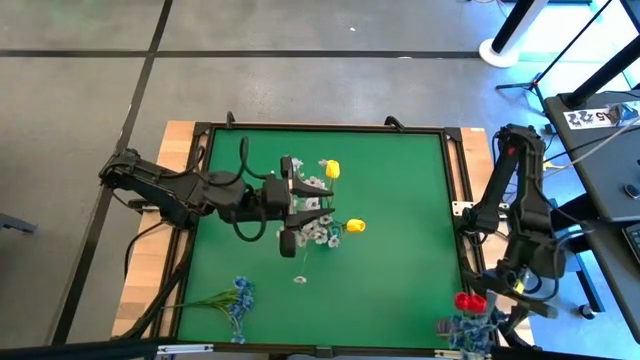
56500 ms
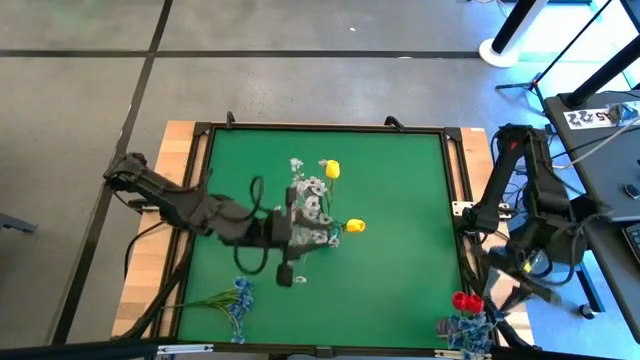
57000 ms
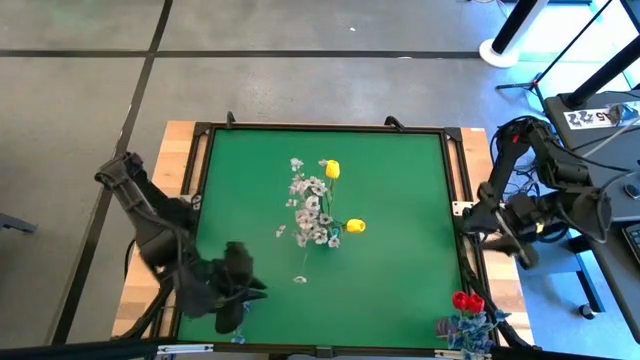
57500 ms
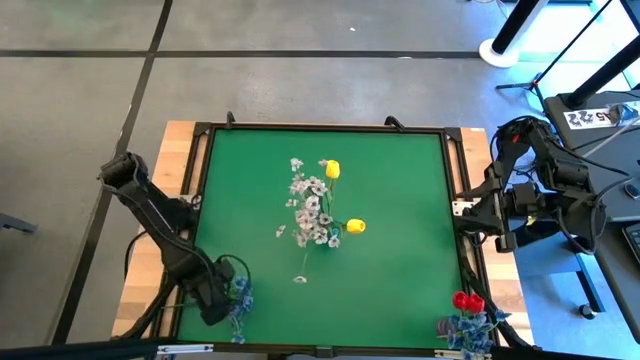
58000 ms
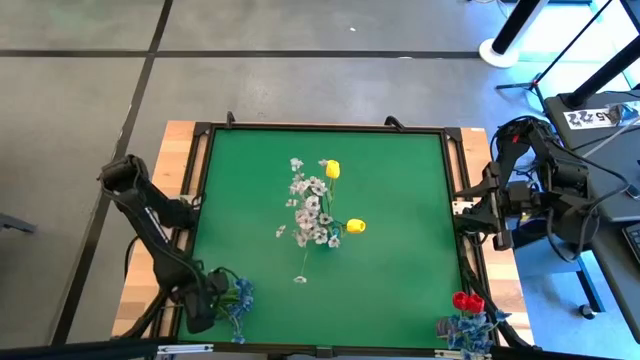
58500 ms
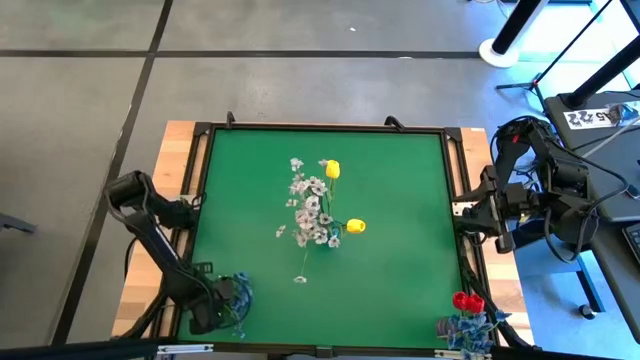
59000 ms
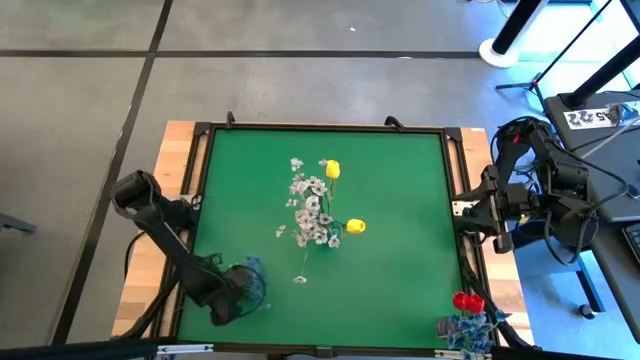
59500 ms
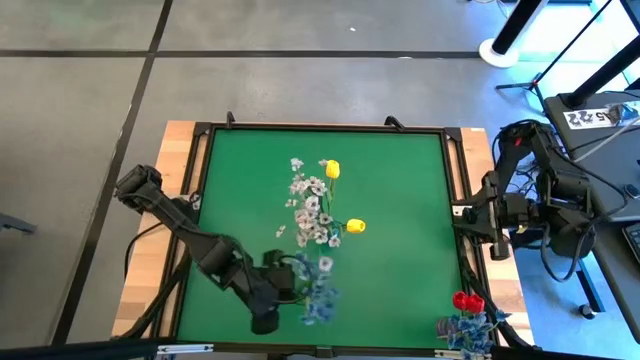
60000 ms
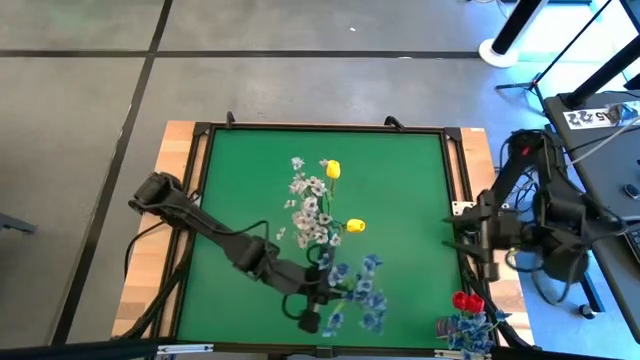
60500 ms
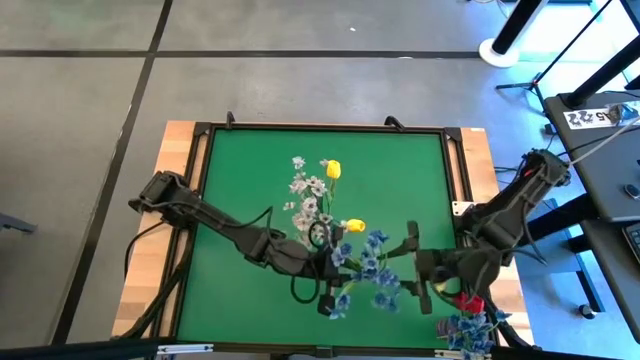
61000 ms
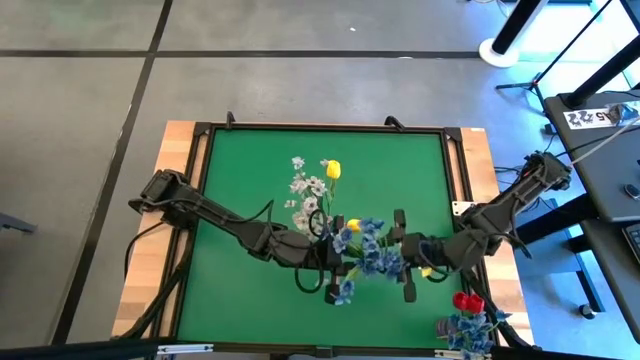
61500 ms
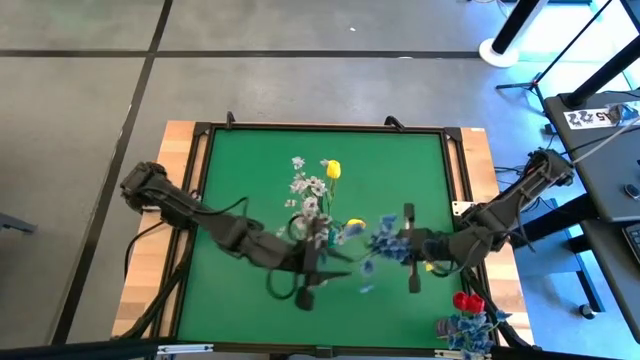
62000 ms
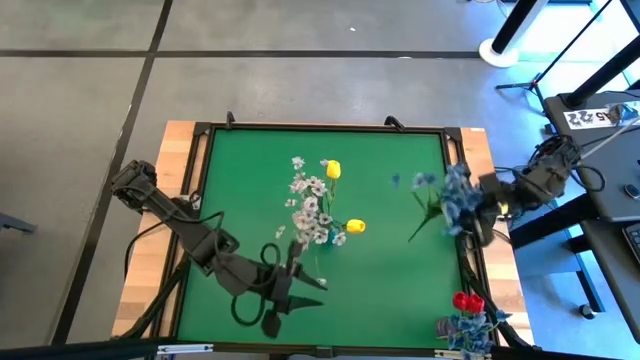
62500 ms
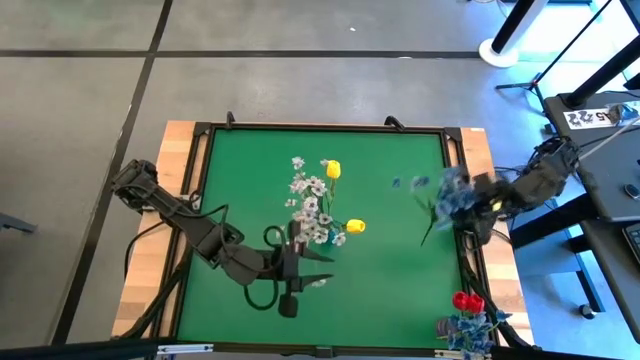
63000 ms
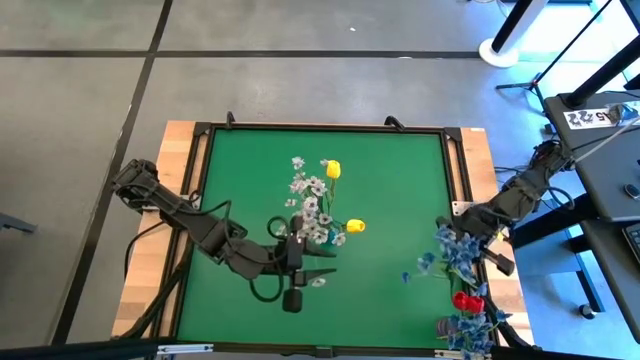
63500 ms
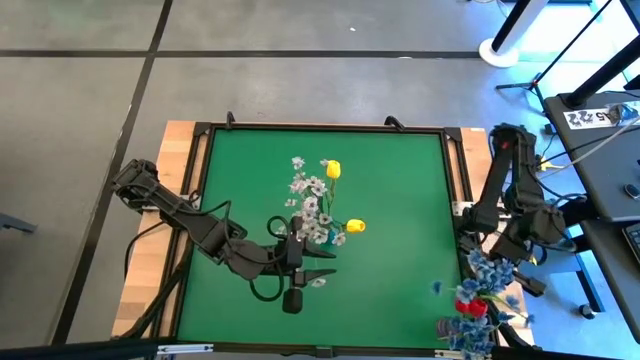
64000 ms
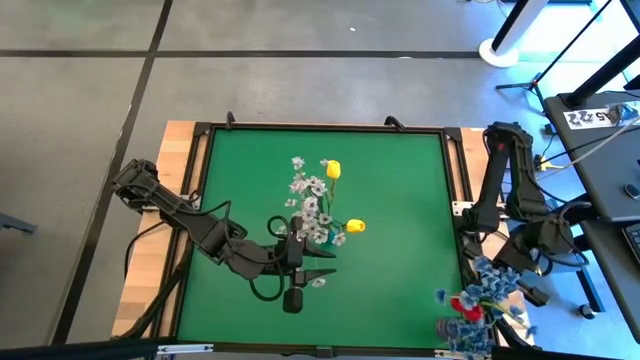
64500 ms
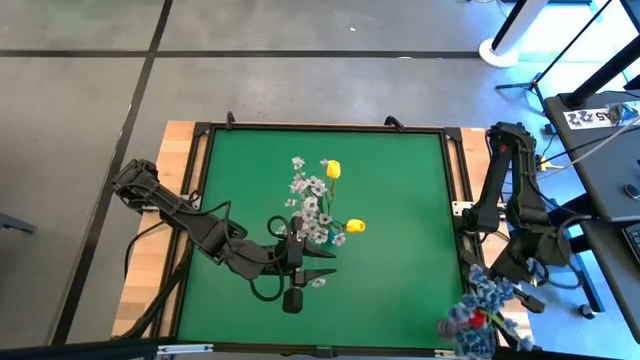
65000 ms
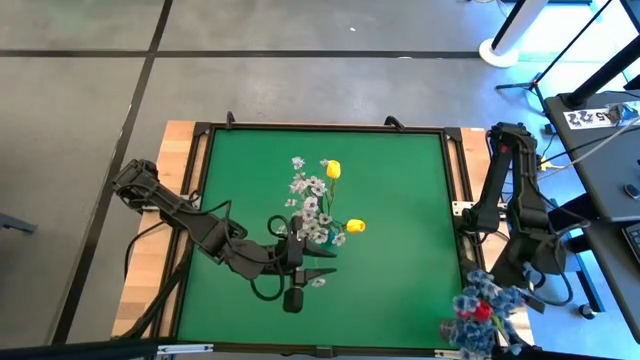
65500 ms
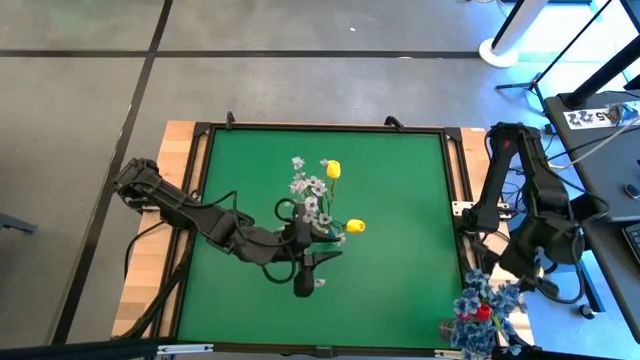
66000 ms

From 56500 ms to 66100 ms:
Task: Sort flowers into vase by color
Put the blue flowers into the purple vase

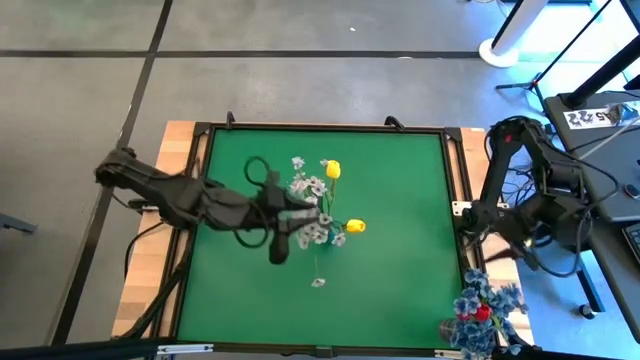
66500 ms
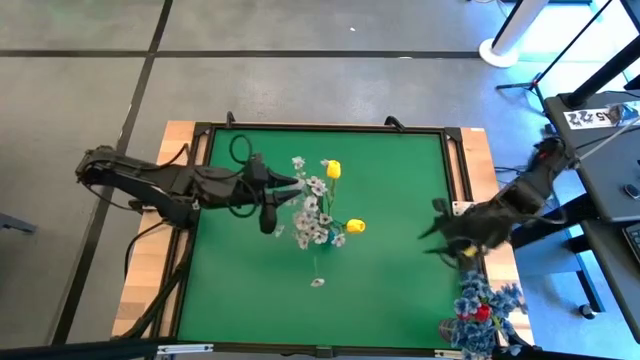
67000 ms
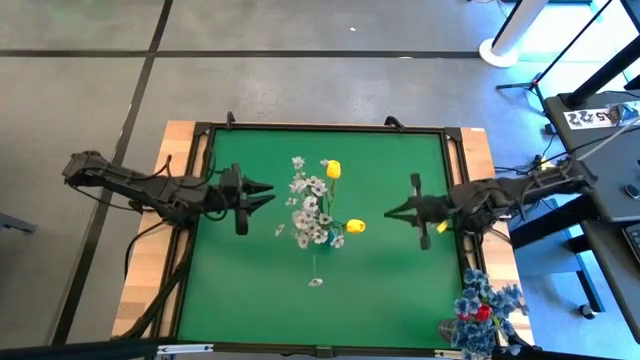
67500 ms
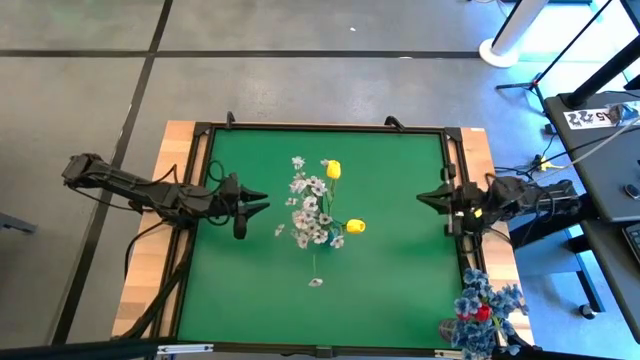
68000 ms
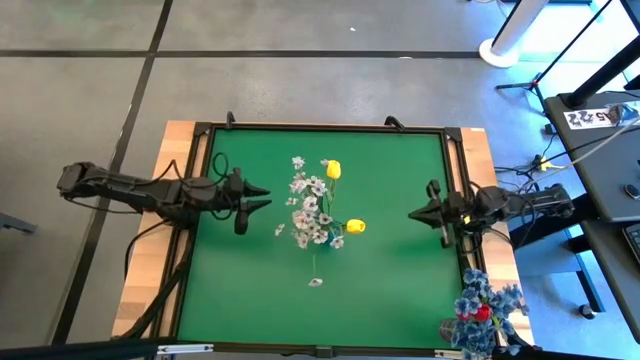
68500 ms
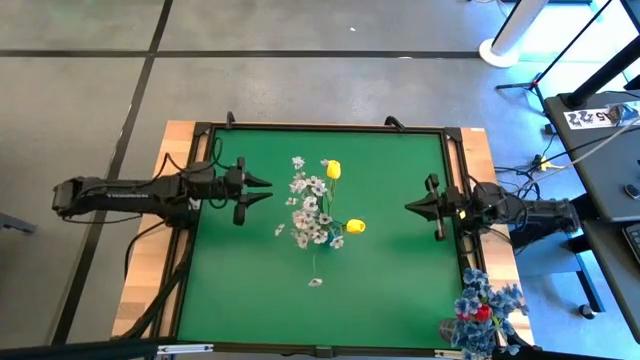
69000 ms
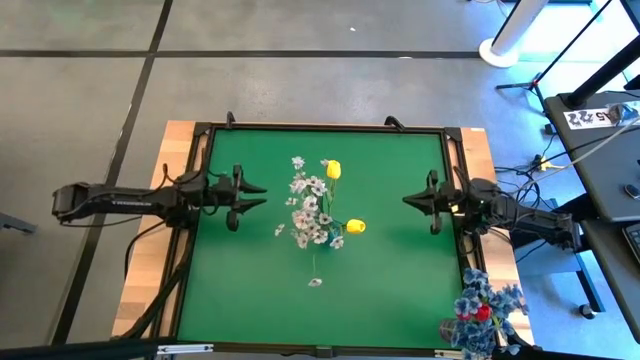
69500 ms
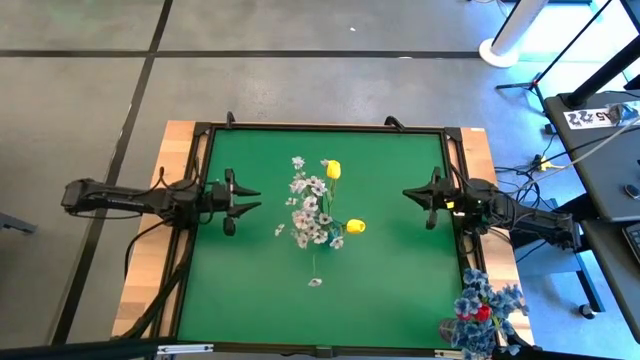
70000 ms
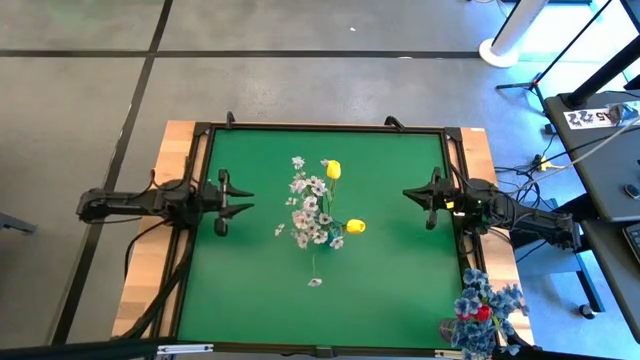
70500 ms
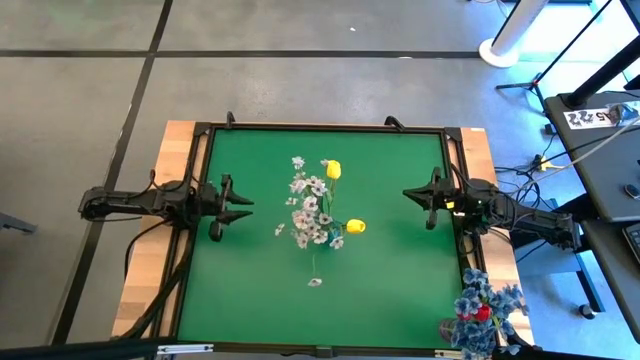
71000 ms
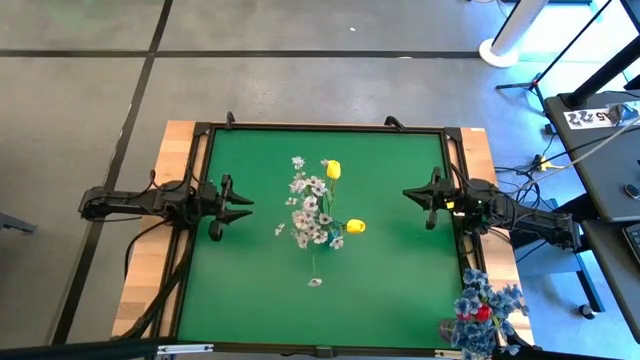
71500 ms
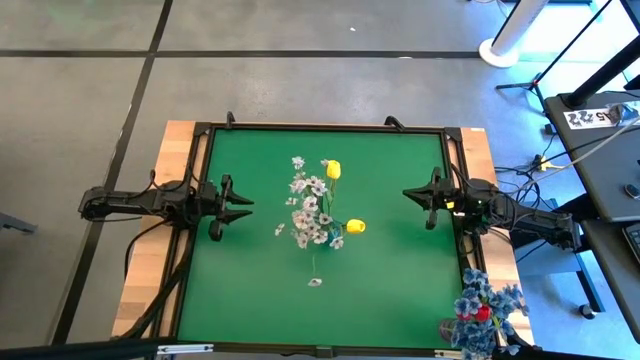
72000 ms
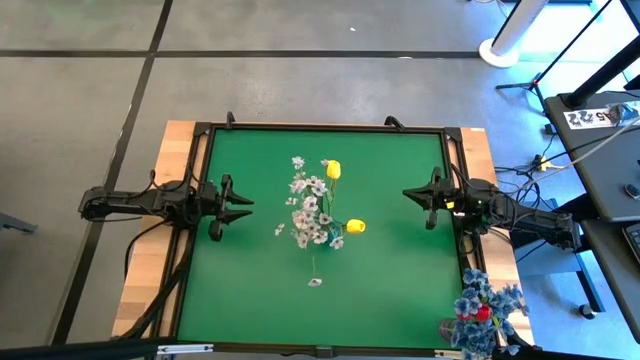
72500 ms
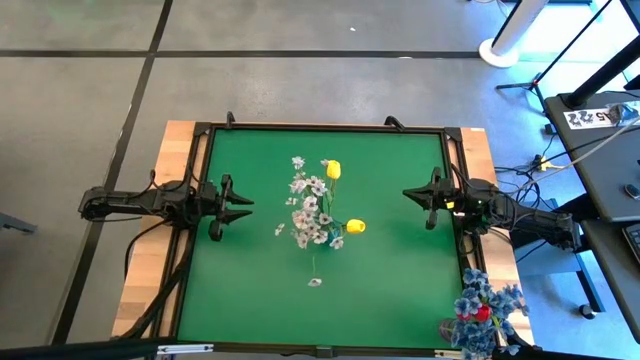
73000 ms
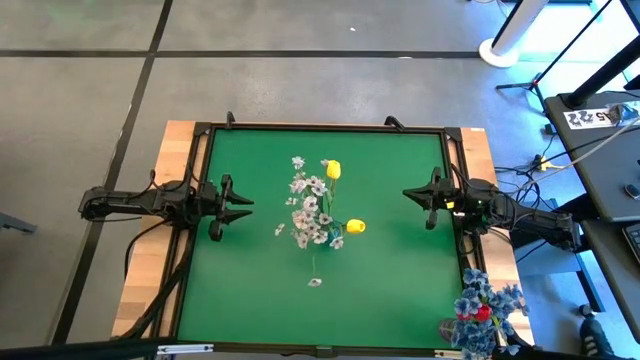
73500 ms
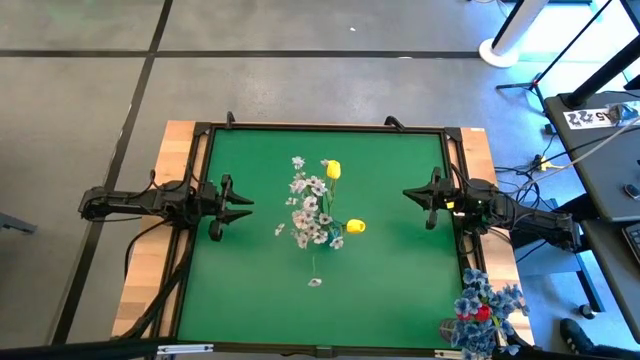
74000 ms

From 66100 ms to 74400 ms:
Return to Home Position

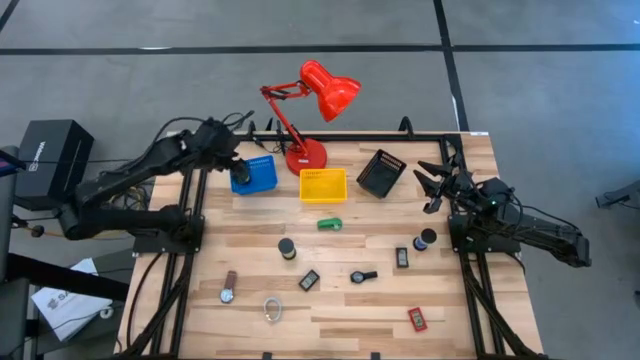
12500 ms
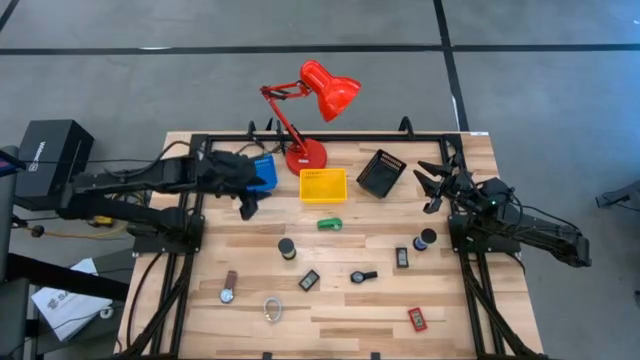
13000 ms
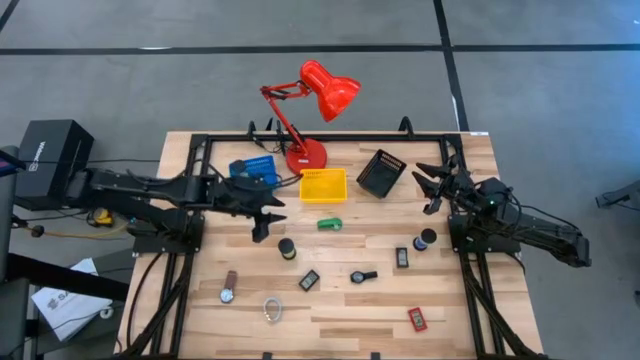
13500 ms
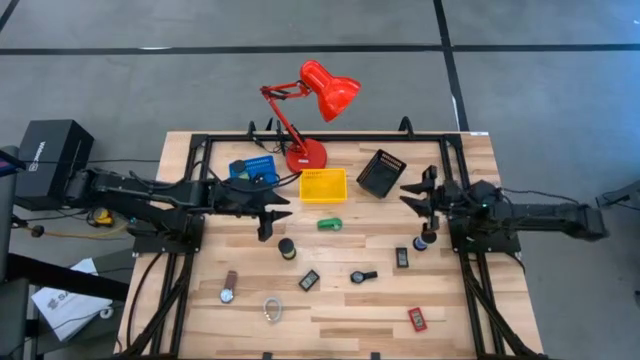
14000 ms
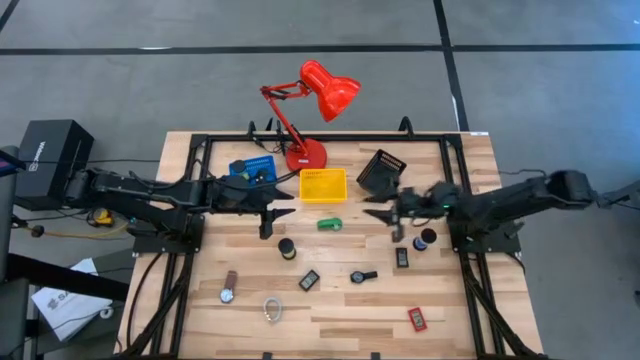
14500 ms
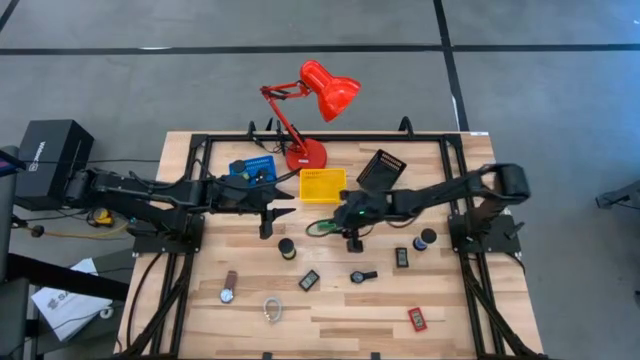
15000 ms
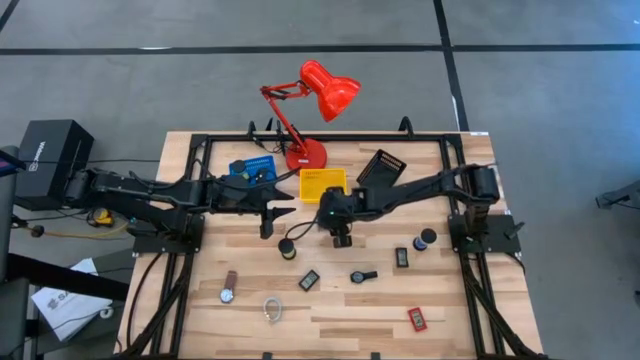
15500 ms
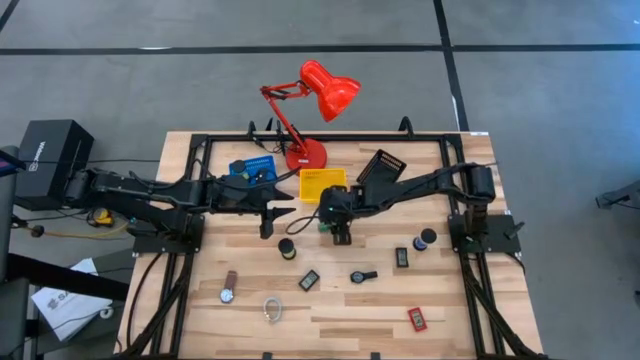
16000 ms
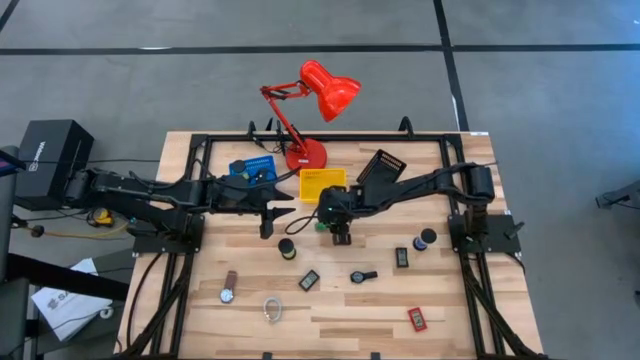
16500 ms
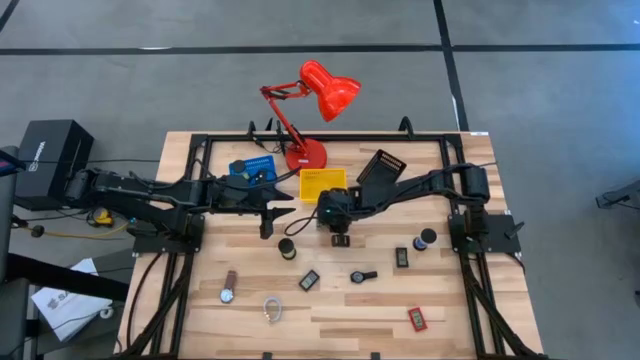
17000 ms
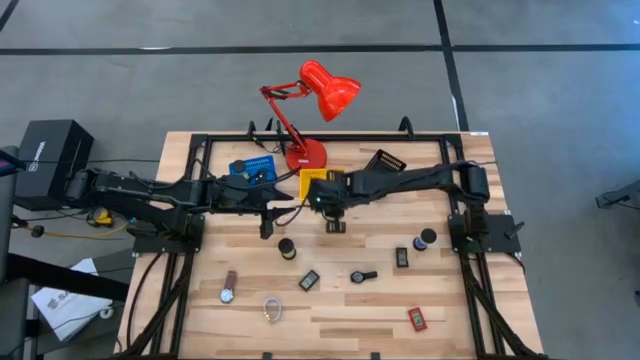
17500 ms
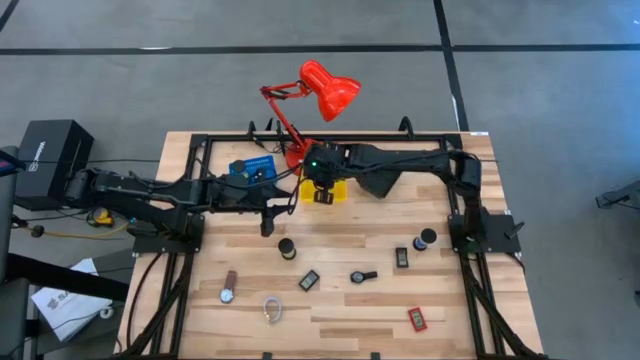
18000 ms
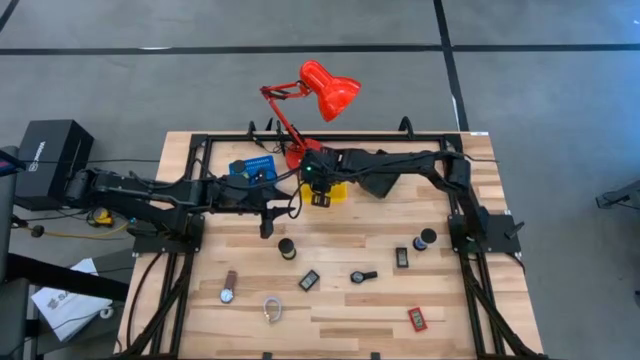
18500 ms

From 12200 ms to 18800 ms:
Task: Pick & Place Office items
Put the green wrist watch into the yellow bin
